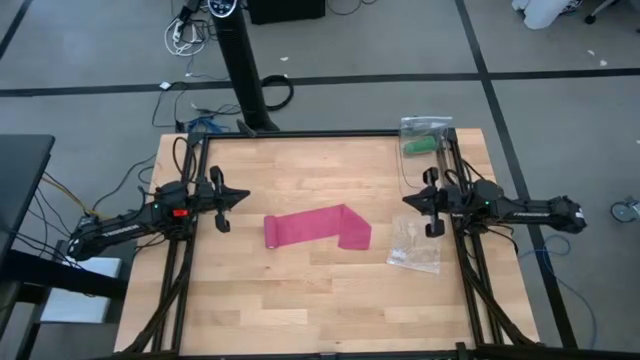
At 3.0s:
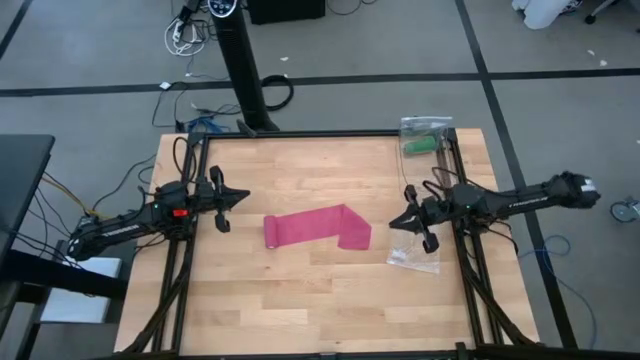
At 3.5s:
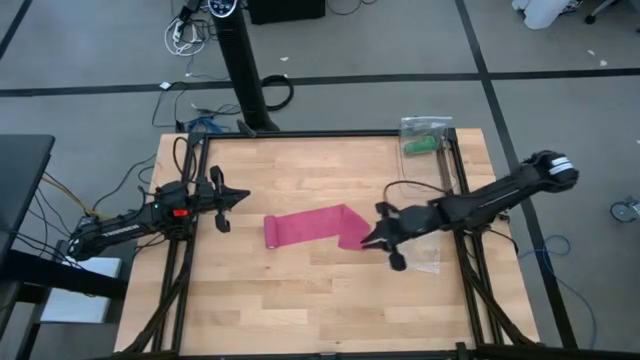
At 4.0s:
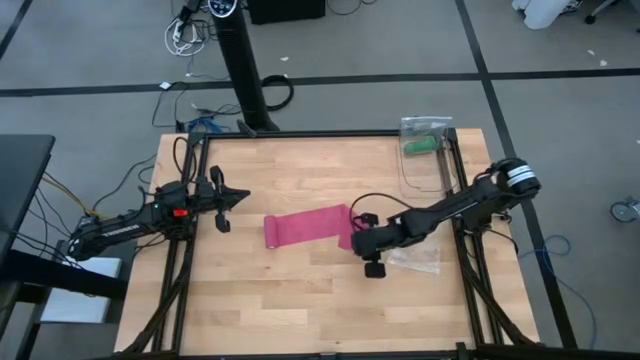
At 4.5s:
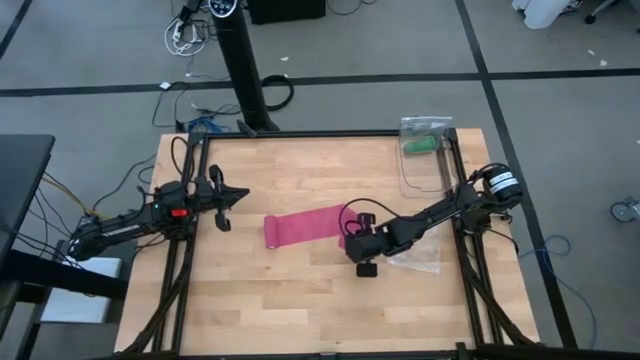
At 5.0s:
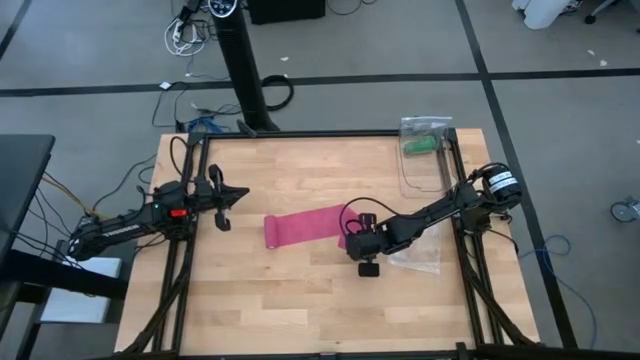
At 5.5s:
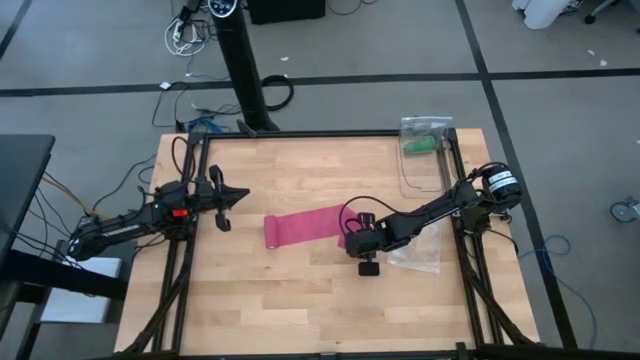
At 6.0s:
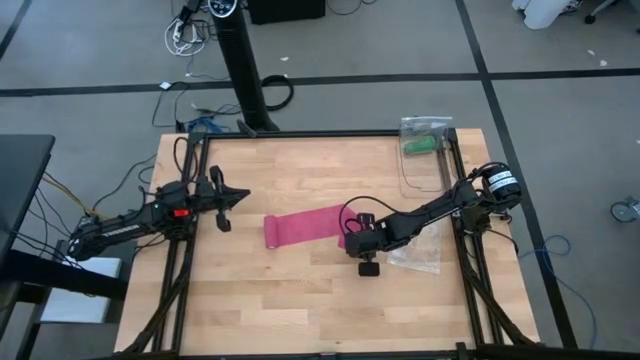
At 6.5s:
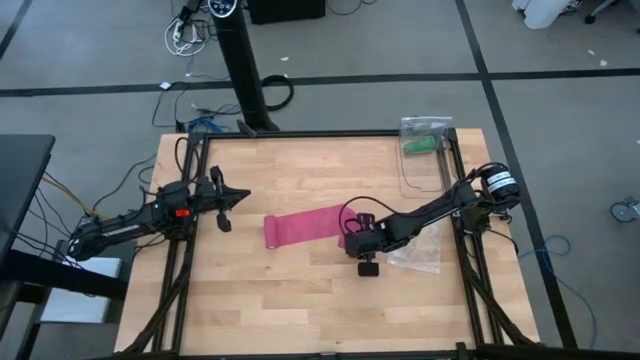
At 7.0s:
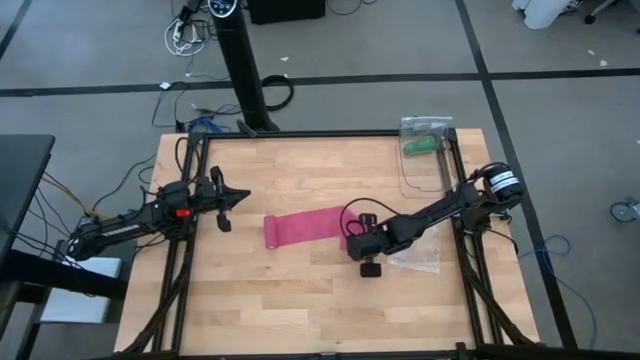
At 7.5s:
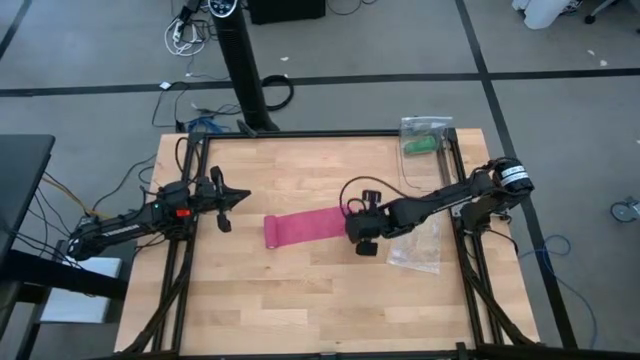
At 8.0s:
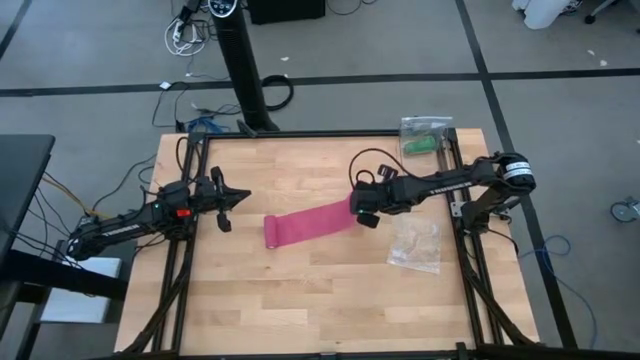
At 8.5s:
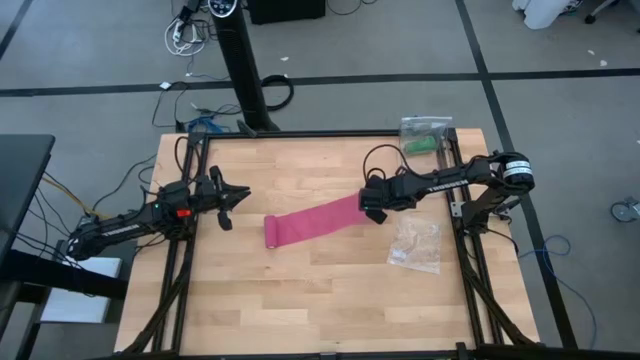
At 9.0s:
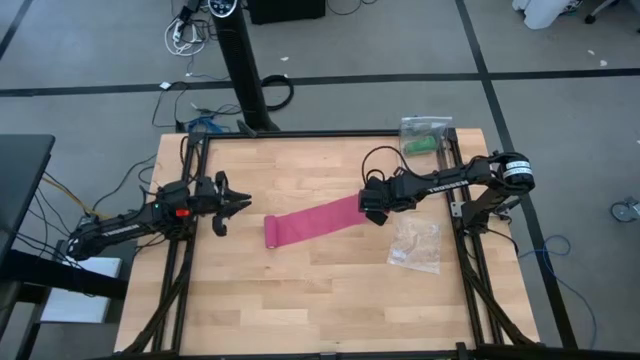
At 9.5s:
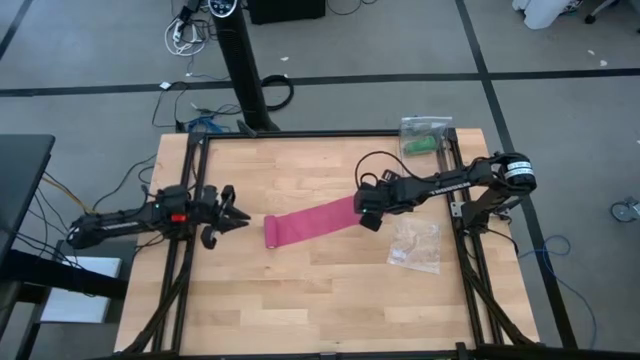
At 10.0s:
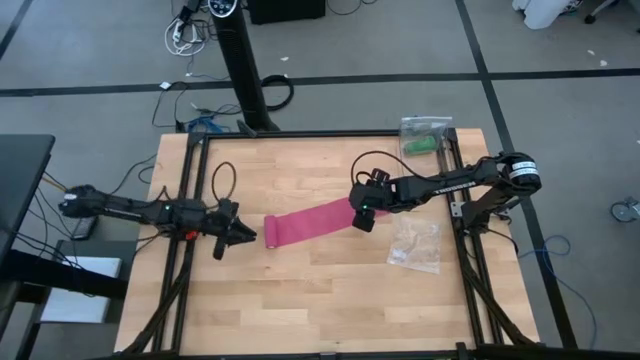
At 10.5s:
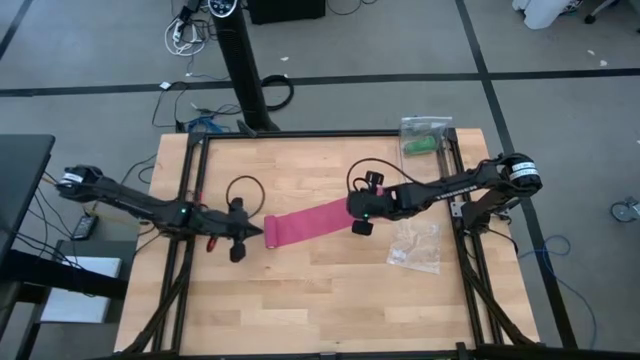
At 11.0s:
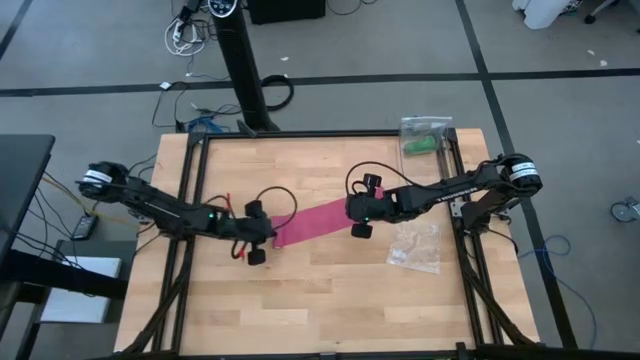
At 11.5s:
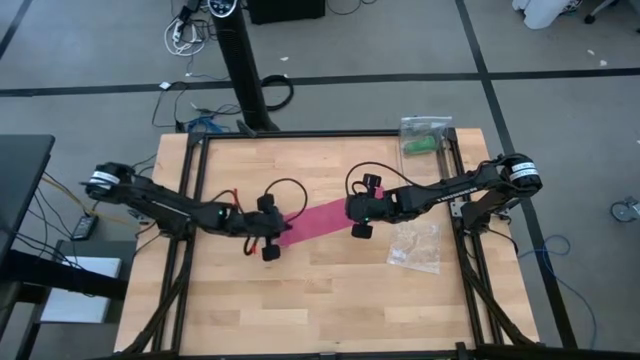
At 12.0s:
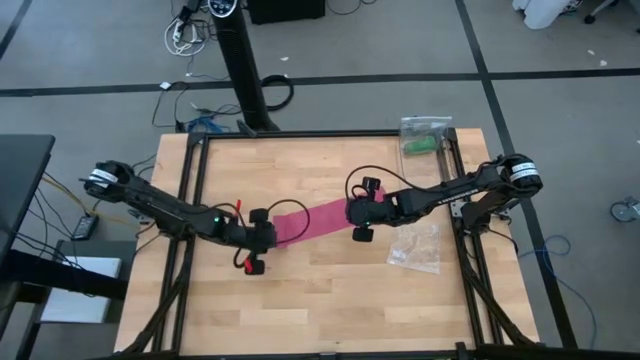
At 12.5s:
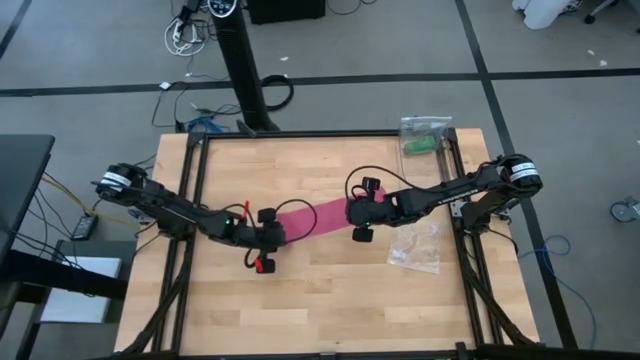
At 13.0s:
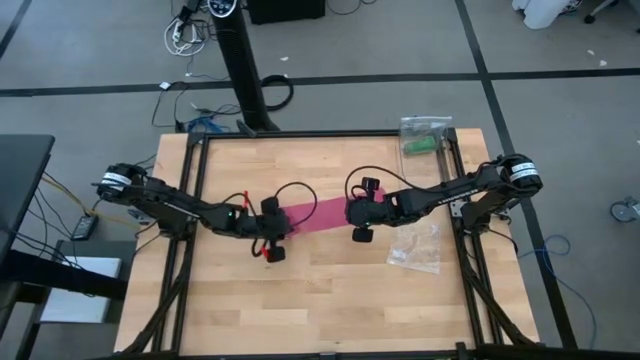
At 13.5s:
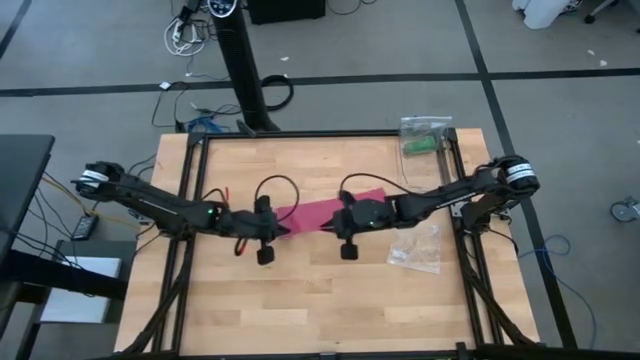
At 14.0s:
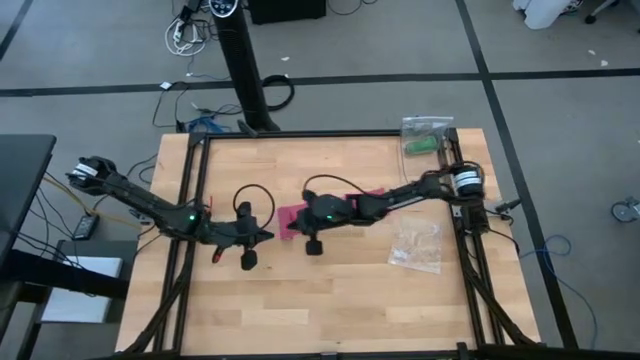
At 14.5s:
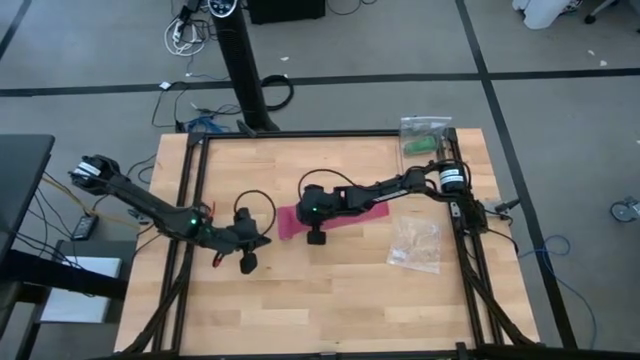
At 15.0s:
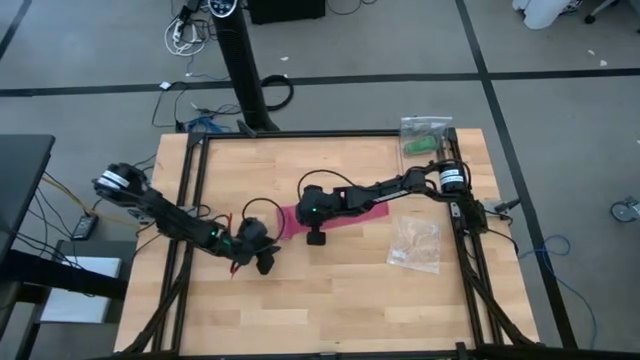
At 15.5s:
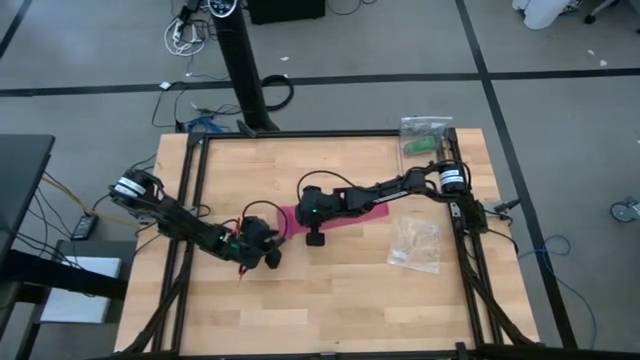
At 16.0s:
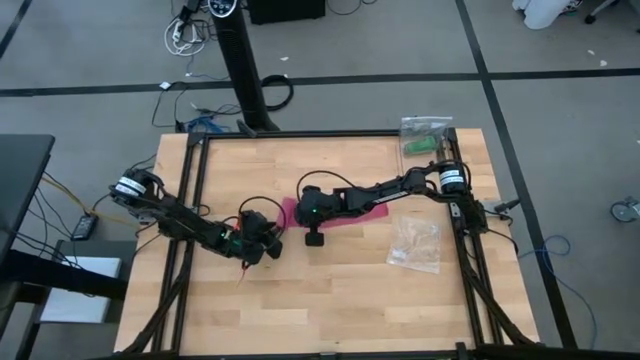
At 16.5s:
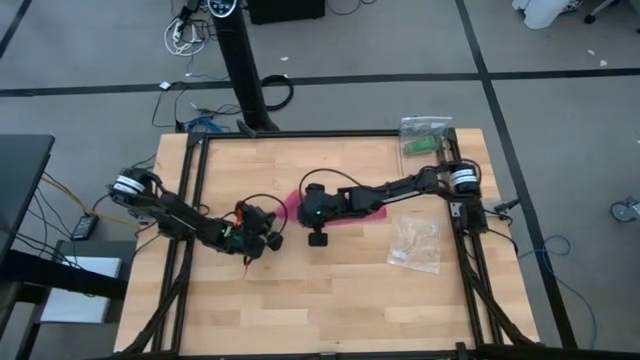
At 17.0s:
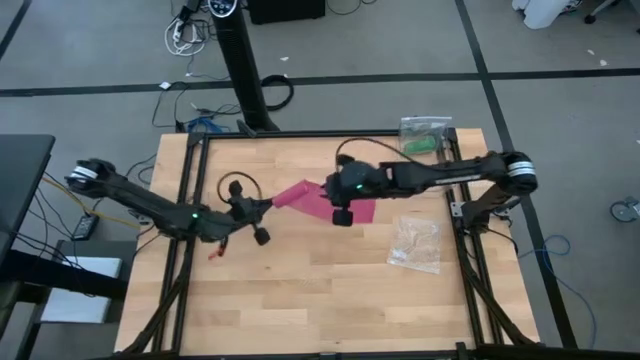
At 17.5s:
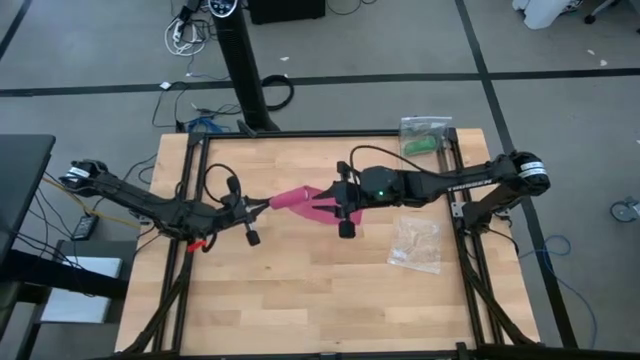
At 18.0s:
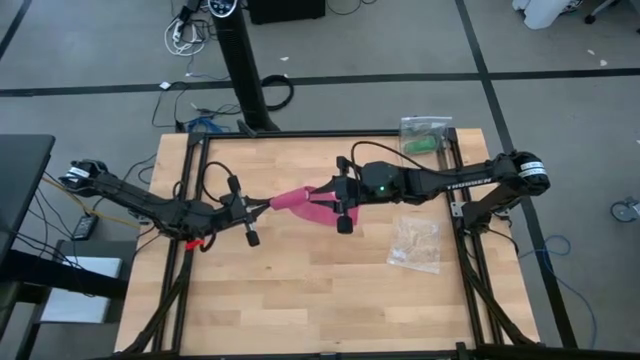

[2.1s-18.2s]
Task: Roll bandage
Roll the pink bandage

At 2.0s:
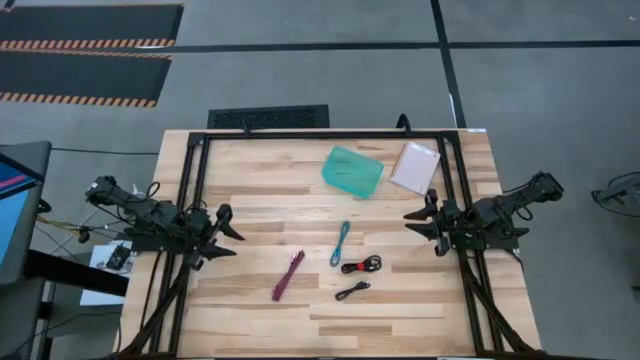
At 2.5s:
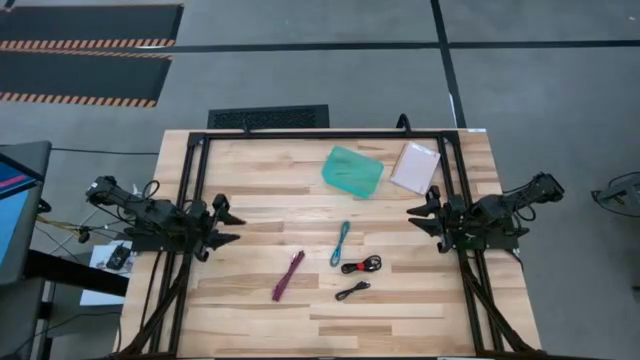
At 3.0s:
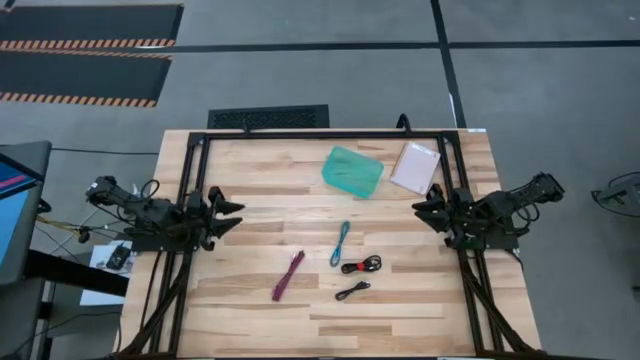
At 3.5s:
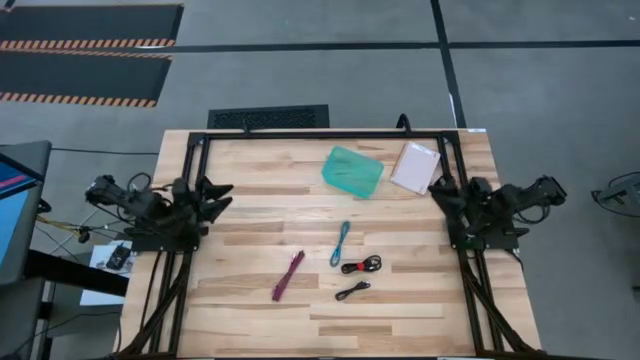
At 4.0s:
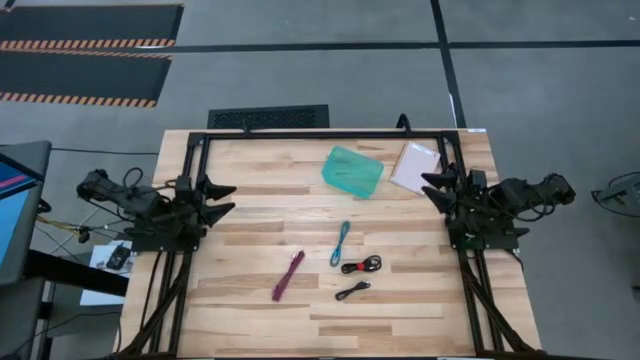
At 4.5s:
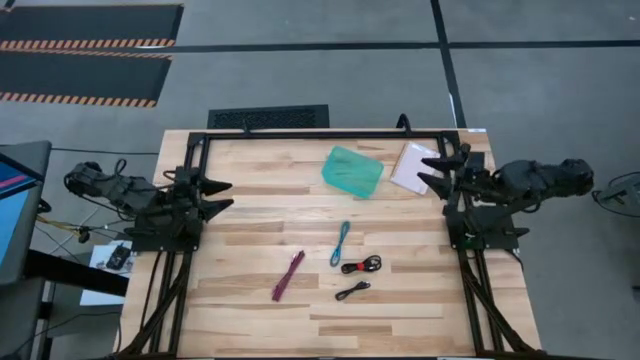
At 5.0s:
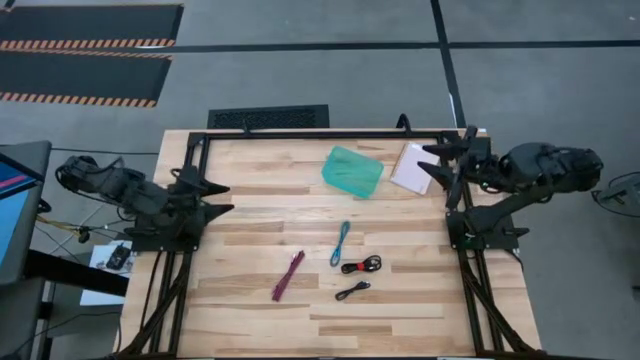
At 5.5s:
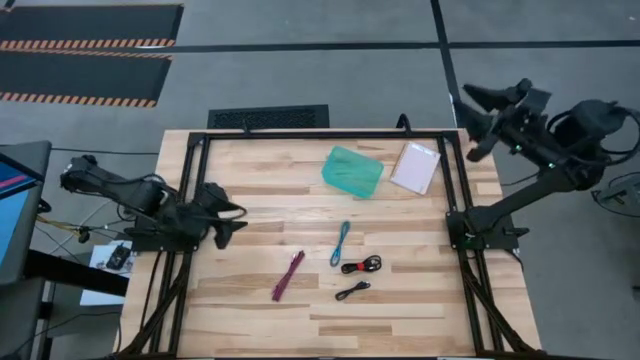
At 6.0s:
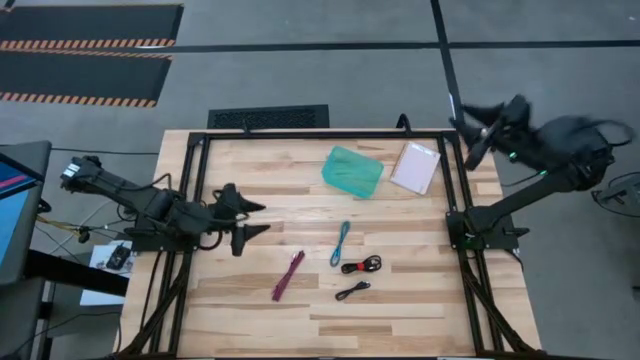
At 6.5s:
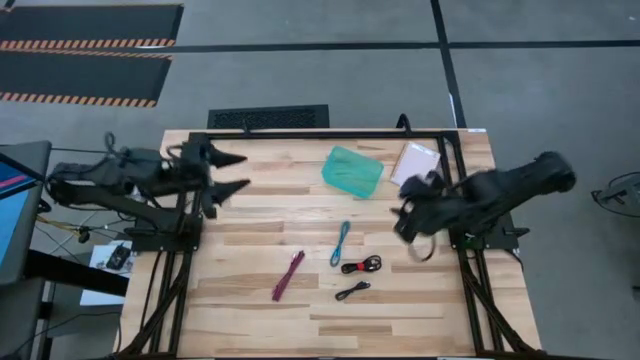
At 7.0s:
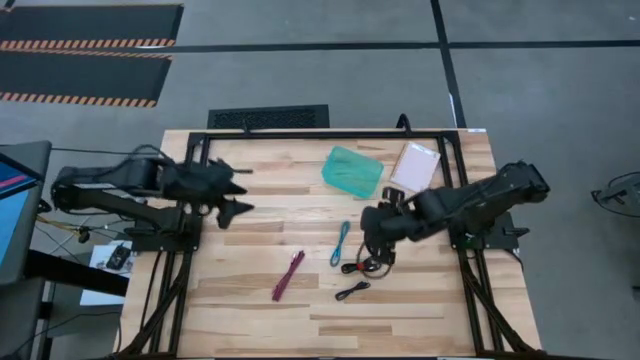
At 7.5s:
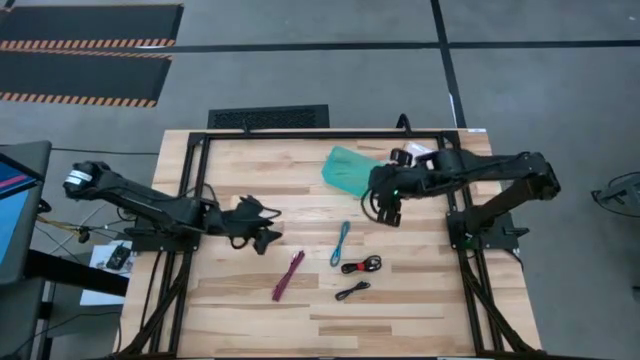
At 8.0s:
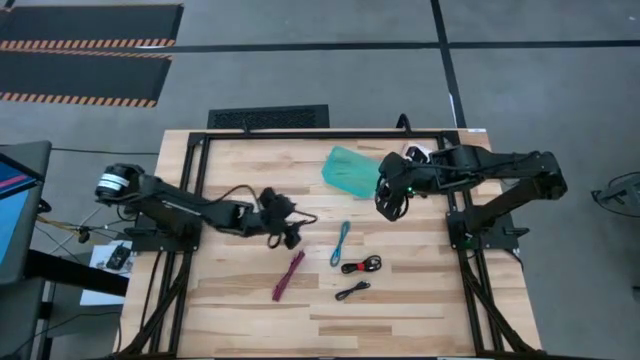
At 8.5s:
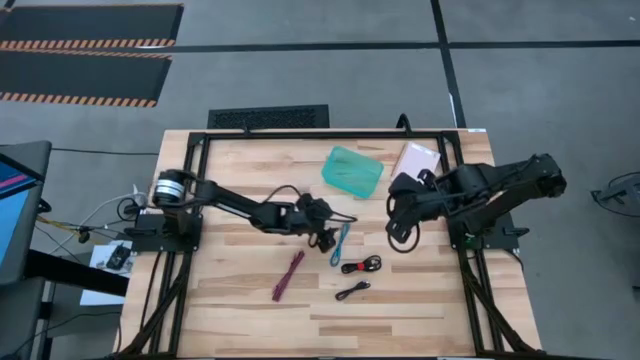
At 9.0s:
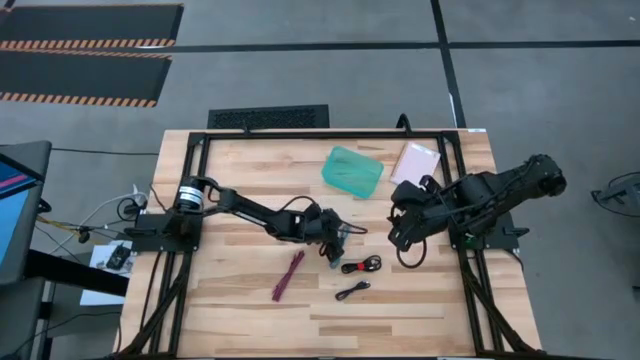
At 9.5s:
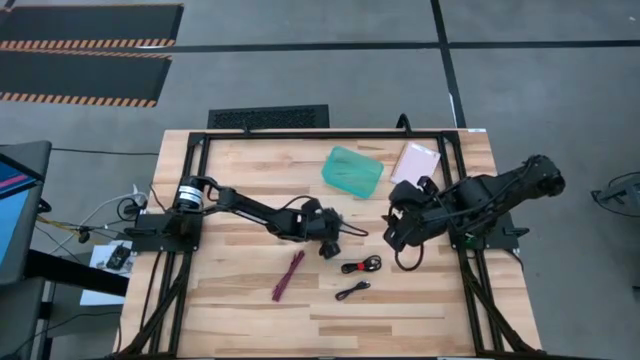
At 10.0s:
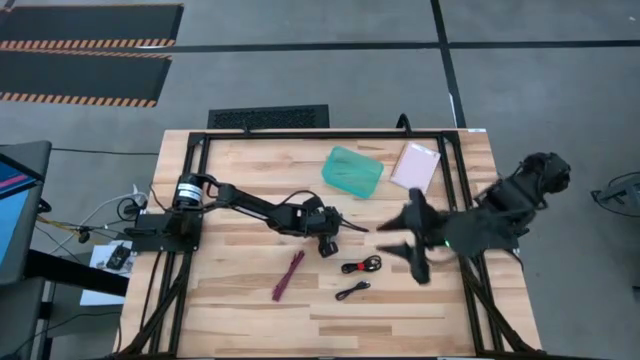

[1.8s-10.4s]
Task: Pick and place USB-C Cables
Put the blue charger cable into the light blue bin
